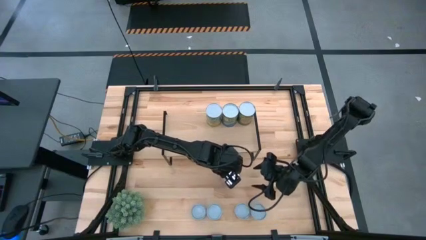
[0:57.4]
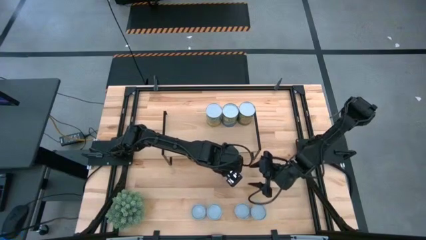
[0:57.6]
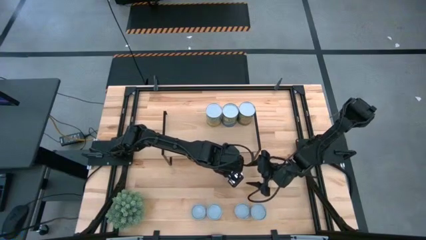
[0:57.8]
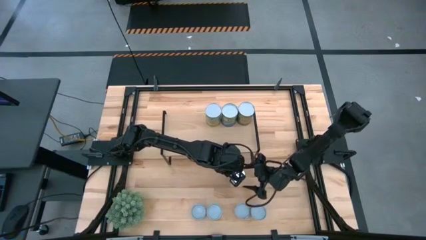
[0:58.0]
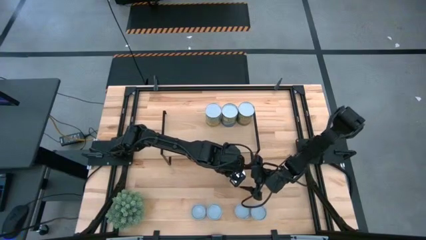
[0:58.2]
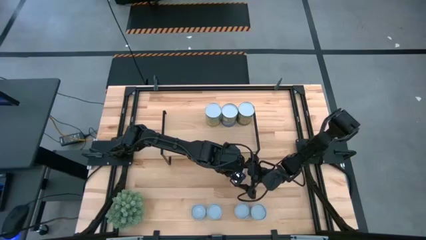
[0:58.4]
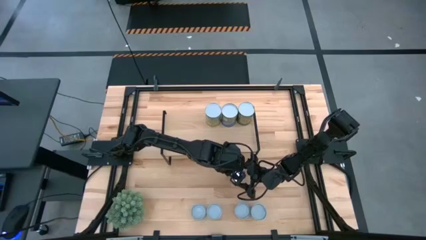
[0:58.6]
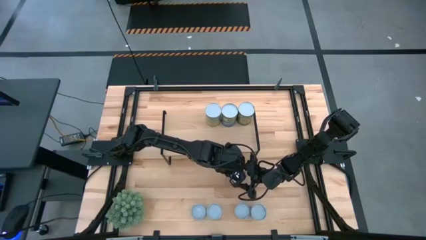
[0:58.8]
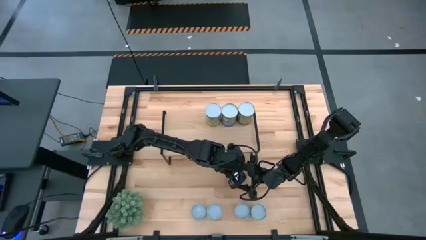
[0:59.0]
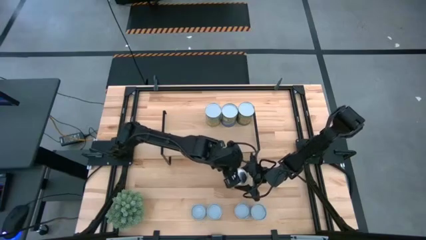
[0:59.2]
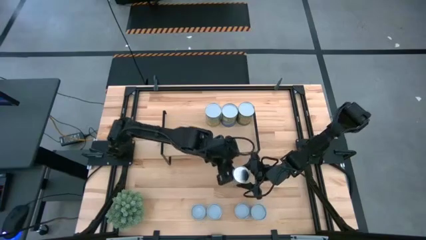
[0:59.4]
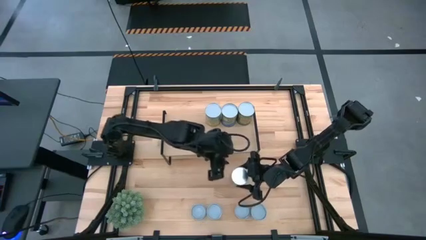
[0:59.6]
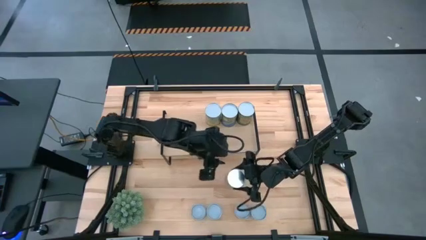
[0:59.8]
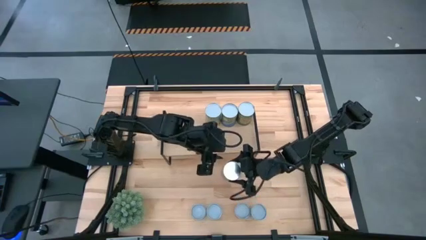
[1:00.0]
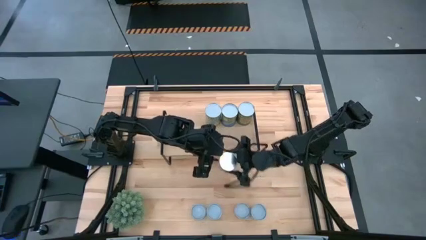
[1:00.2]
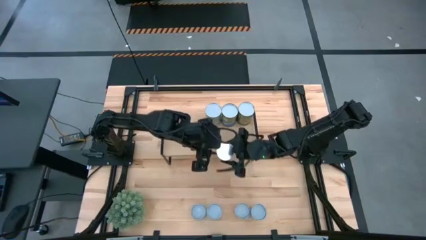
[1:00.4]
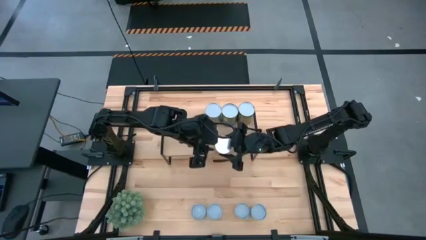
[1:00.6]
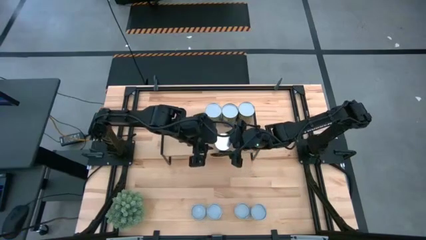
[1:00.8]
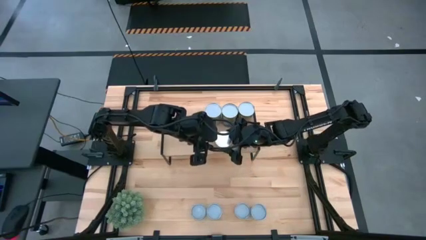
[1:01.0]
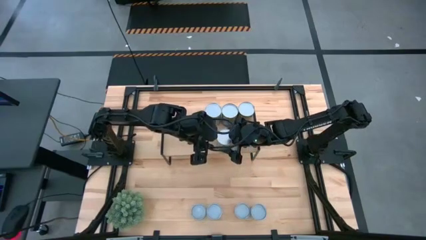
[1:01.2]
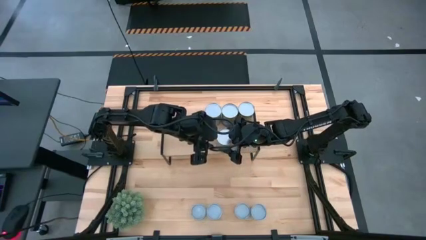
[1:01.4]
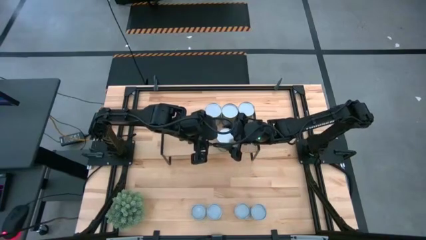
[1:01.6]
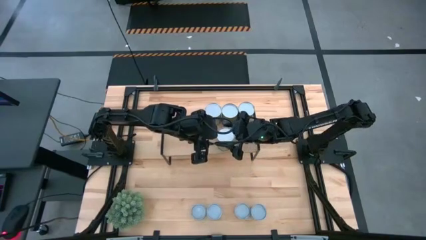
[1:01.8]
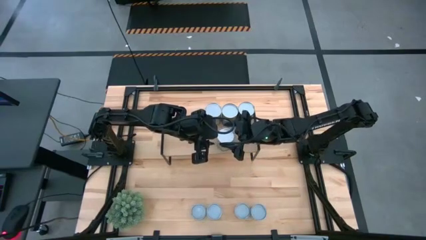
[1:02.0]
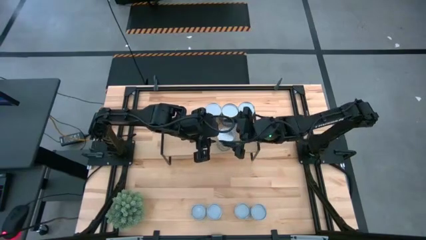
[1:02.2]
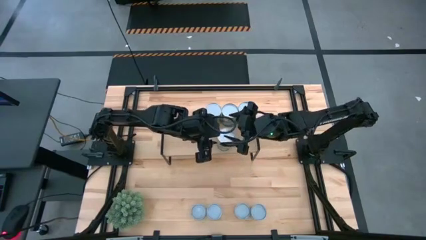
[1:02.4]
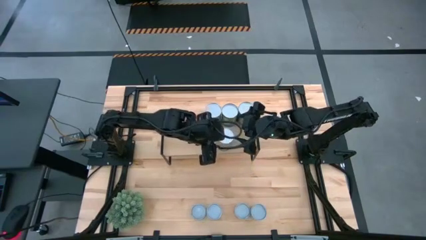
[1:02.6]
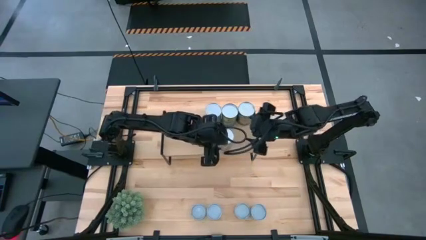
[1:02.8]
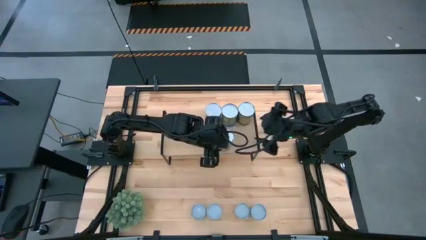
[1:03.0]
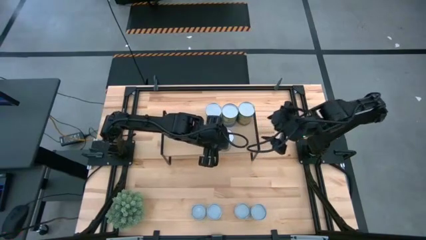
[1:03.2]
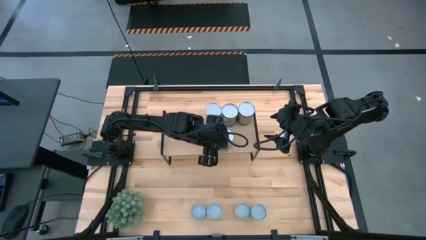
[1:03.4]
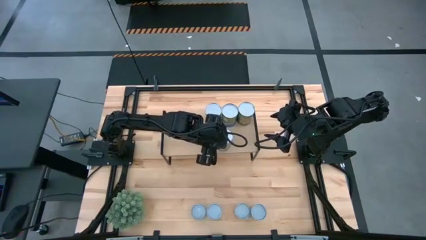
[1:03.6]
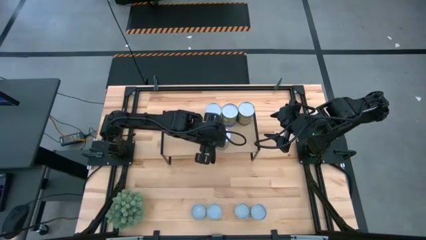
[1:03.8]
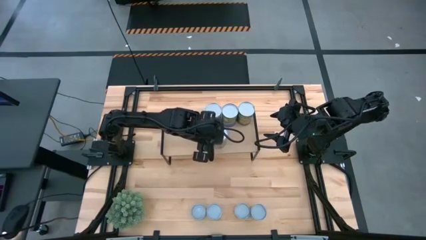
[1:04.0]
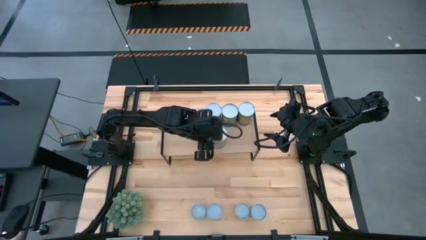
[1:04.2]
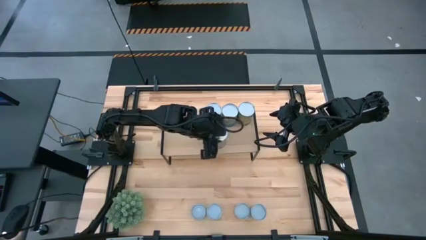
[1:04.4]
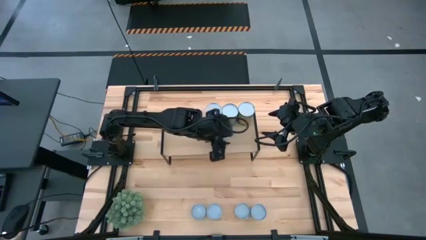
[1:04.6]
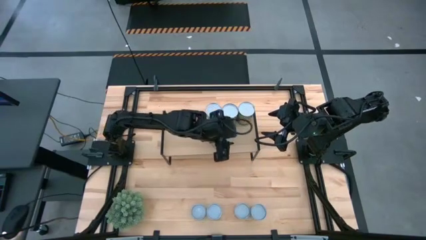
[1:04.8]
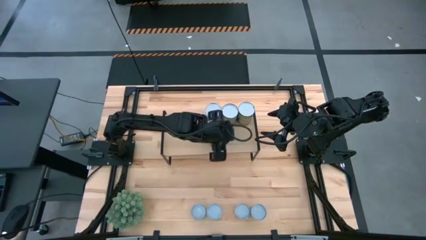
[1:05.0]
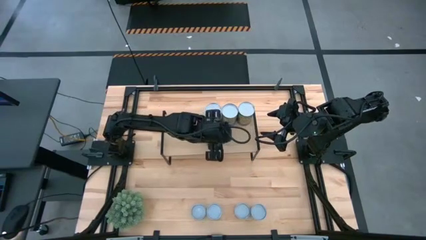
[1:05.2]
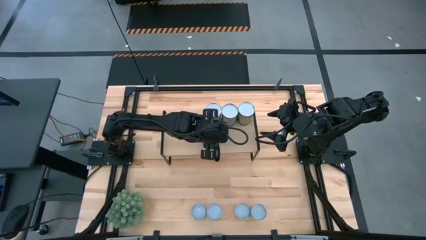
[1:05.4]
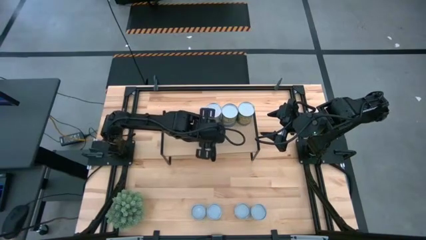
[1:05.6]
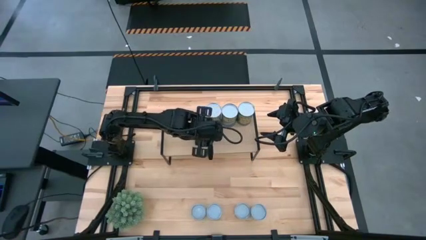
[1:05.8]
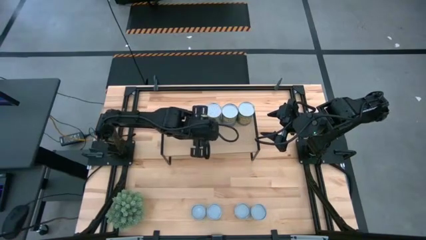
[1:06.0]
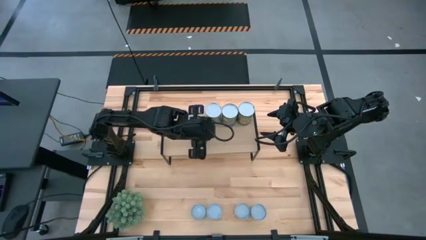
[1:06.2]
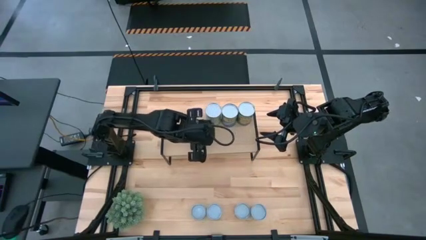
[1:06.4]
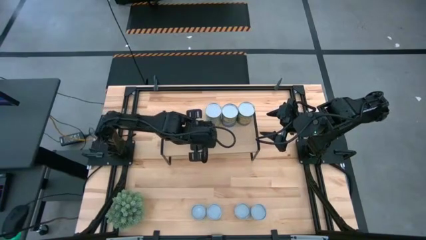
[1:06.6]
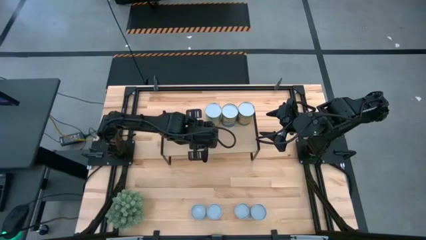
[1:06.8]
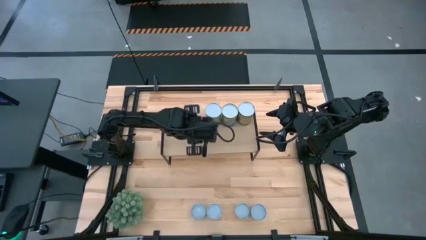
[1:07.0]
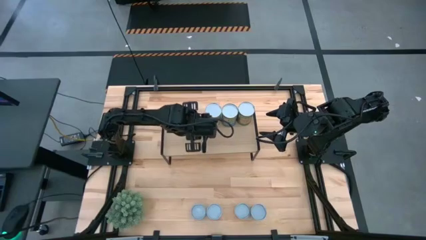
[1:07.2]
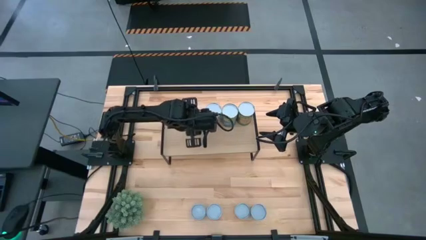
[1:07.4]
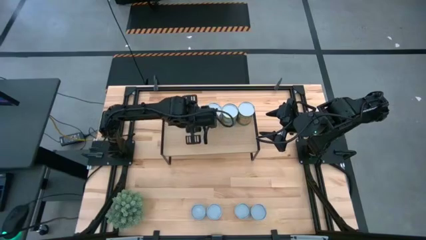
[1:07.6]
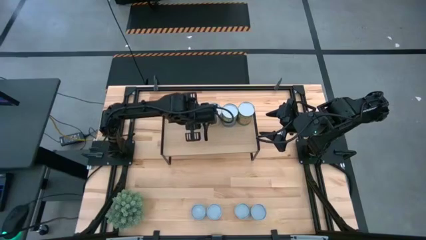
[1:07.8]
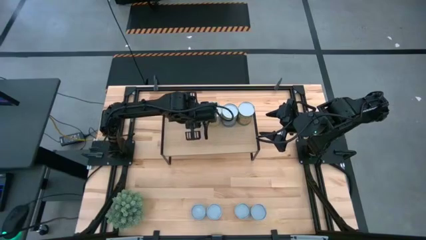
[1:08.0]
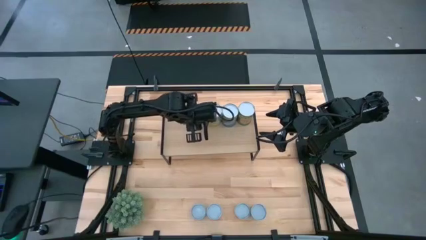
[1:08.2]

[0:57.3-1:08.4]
Task: Pick and place cans onto a shelf
Put the canned peaches on the shelf

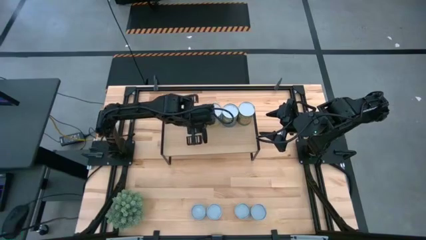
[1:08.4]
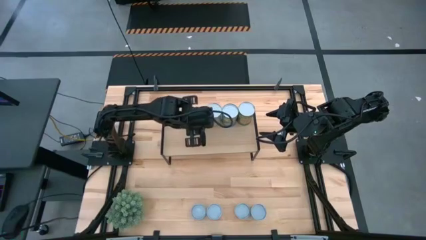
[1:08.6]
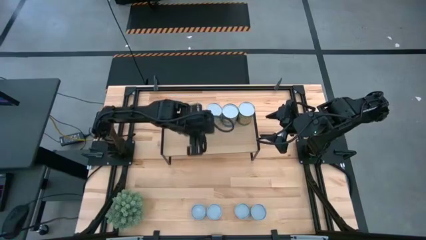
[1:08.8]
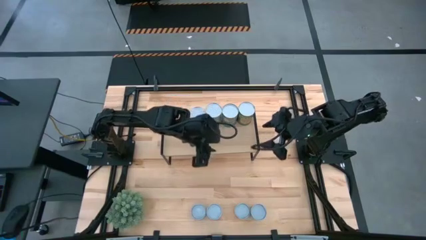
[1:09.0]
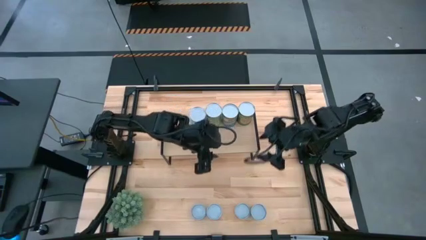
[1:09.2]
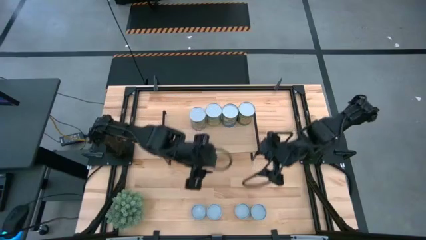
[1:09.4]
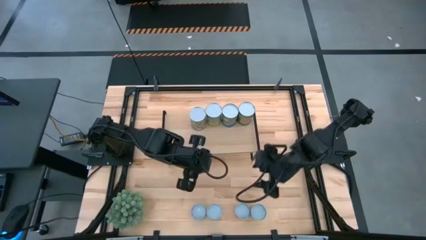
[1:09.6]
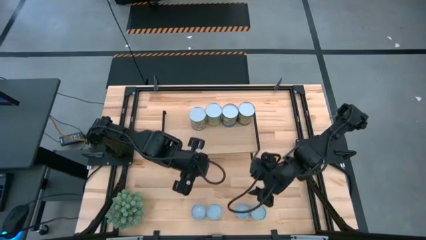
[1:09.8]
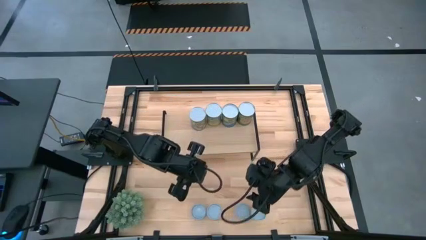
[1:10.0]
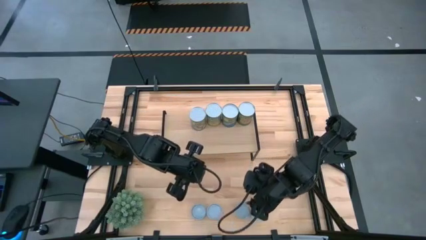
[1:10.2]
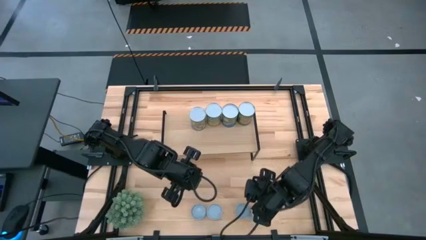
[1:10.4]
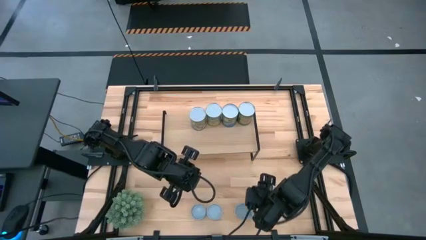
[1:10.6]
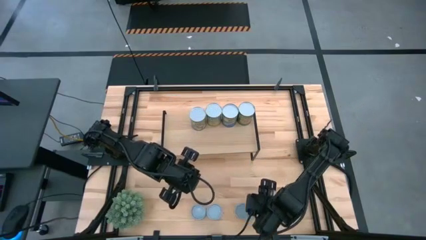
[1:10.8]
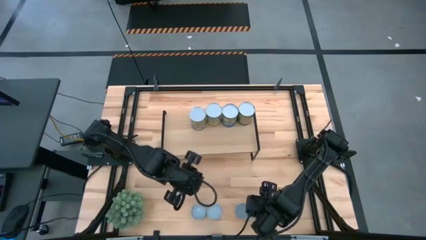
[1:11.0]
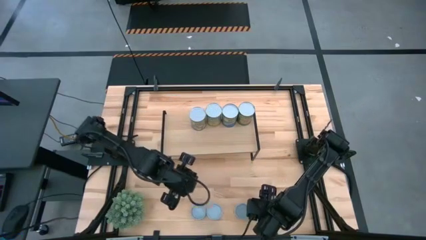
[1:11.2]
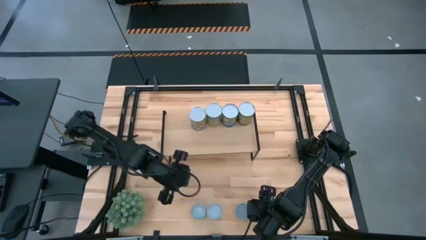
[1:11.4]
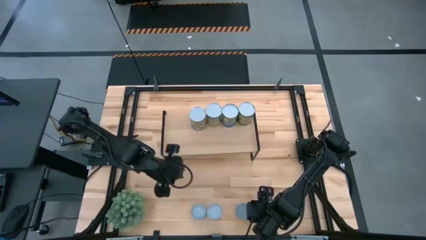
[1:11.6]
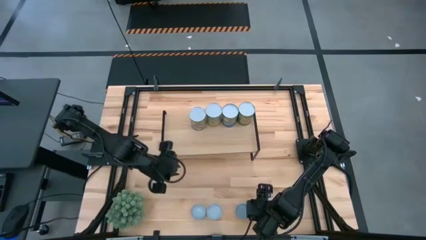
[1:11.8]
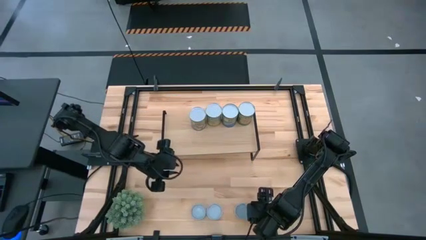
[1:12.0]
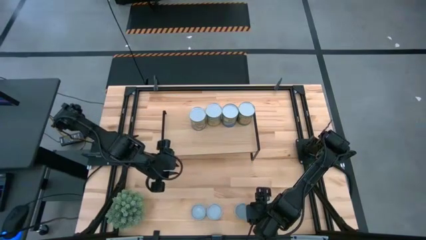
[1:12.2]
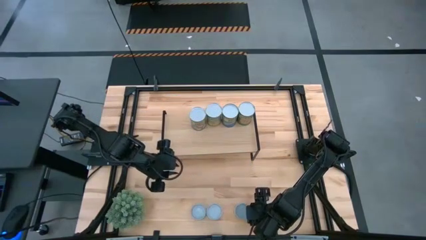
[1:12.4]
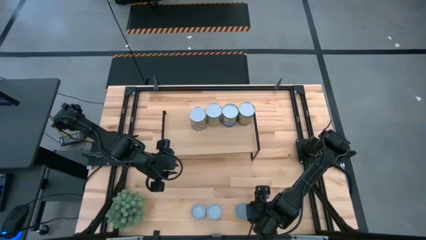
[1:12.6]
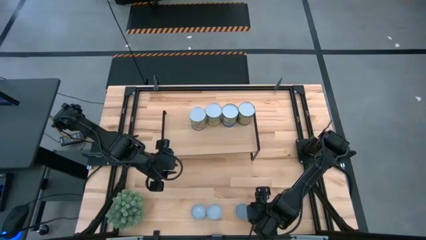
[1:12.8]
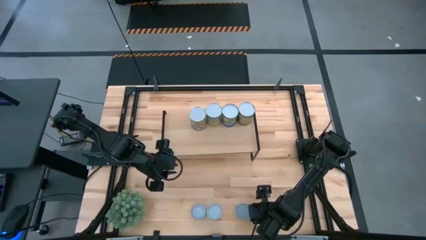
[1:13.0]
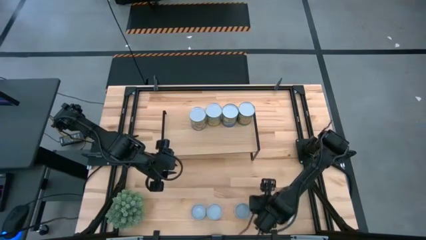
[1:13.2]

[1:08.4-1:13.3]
Put the canned mixed vegetables on the shelf
